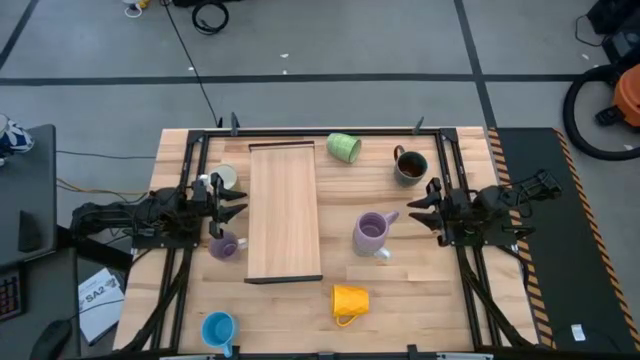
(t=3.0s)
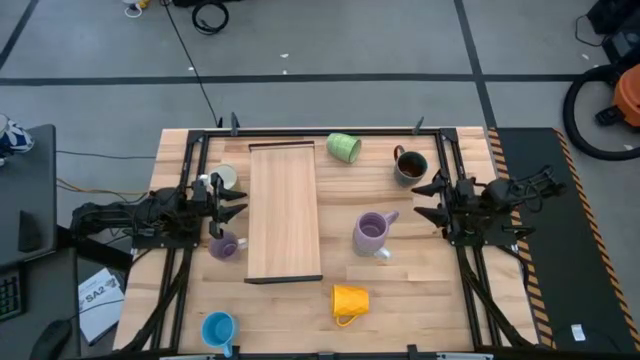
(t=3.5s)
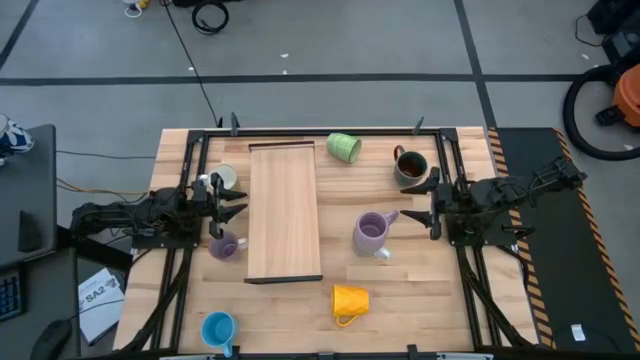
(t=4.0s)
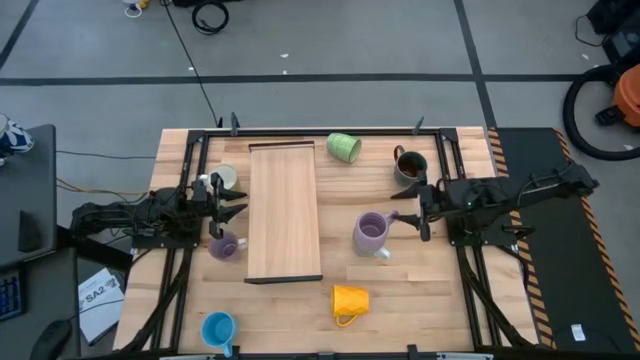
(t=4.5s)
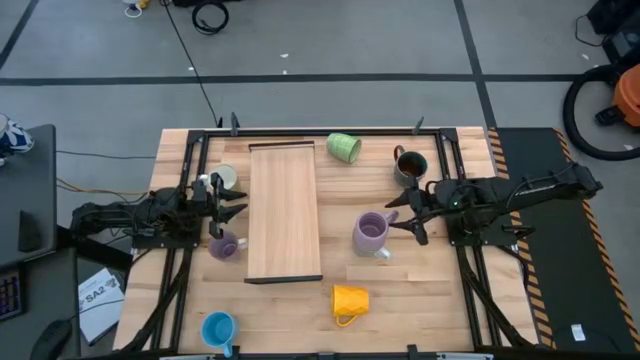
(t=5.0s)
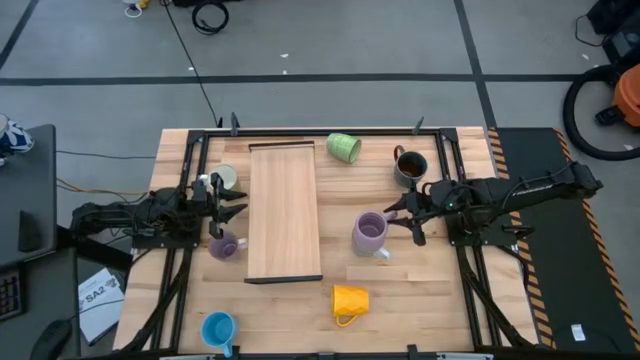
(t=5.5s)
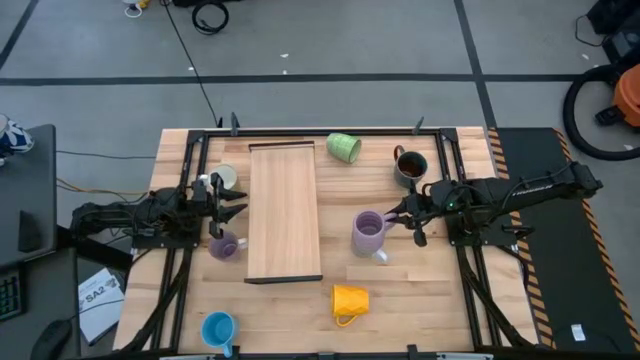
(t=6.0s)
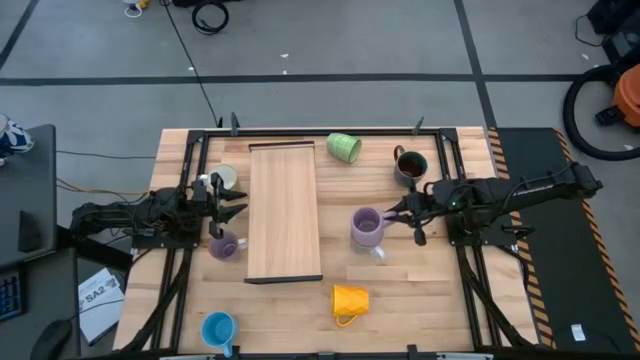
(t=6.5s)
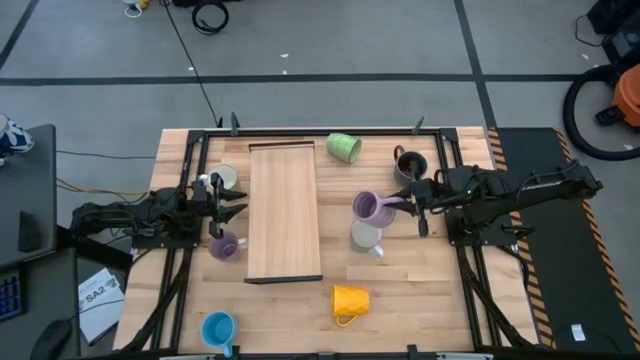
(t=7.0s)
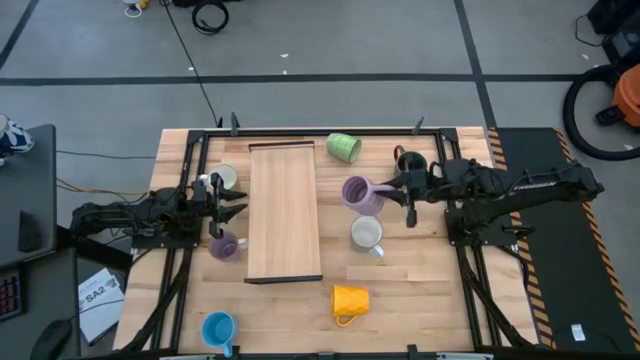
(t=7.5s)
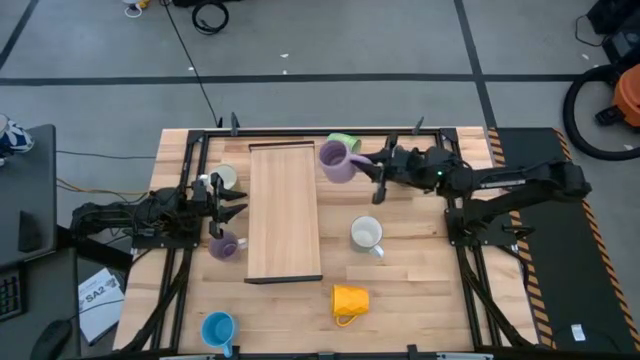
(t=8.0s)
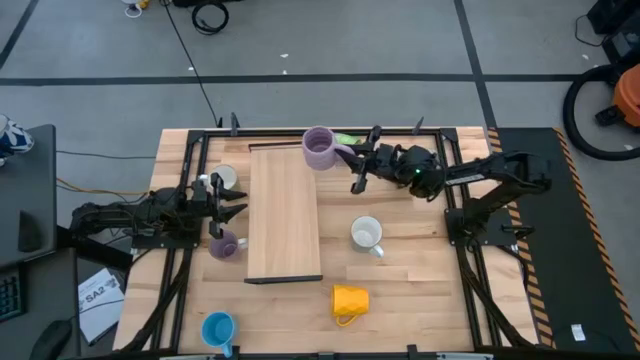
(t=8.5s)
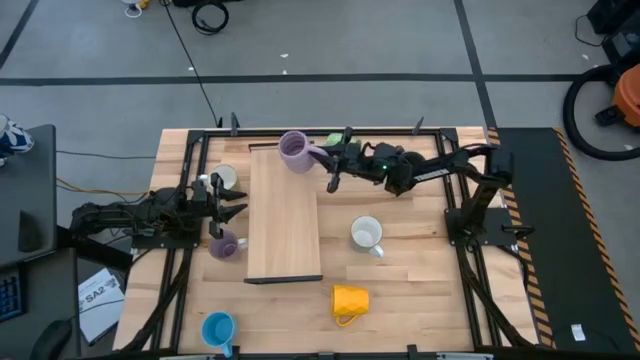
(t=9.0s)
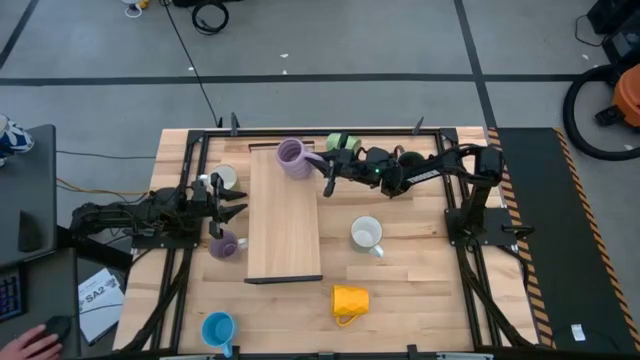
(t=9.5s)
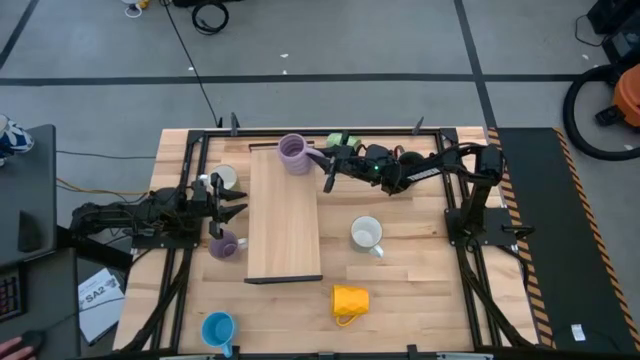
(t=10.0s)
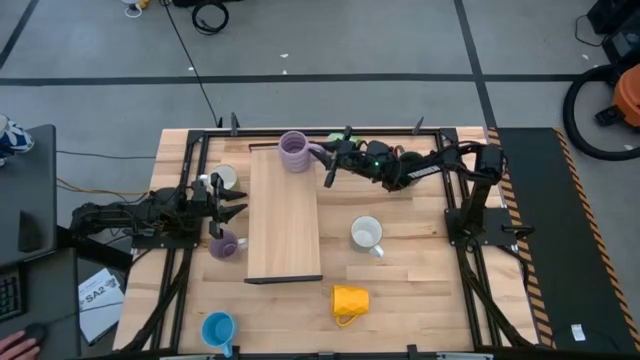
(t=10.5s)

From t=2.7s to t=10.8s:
Task: Place coffee mugs
Put the light purple mug on the shelf

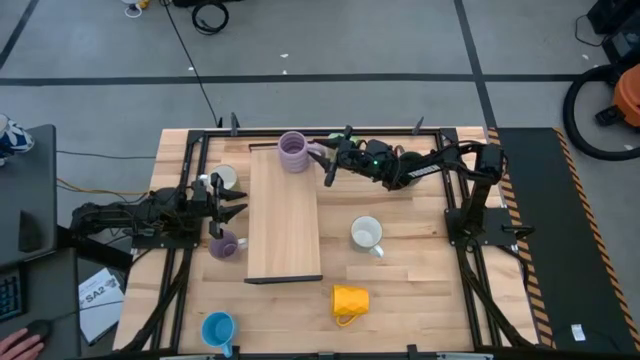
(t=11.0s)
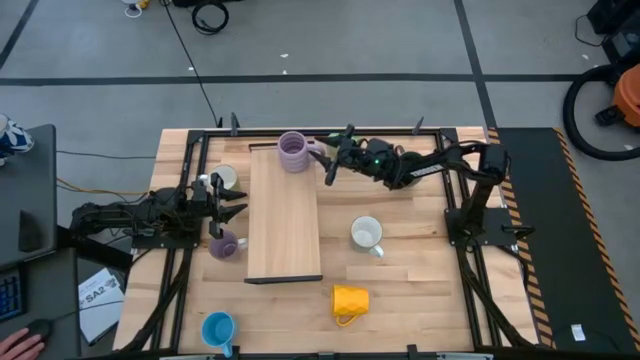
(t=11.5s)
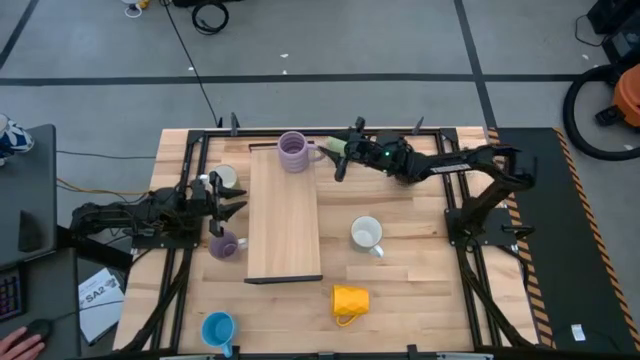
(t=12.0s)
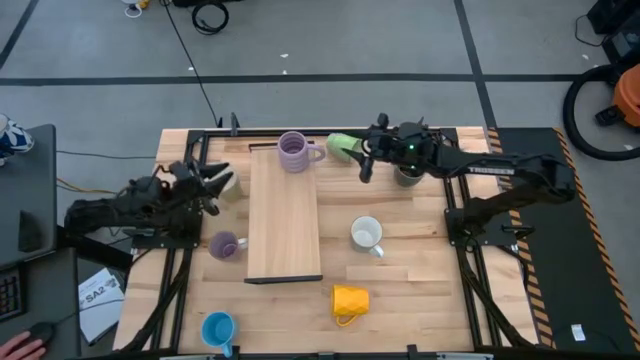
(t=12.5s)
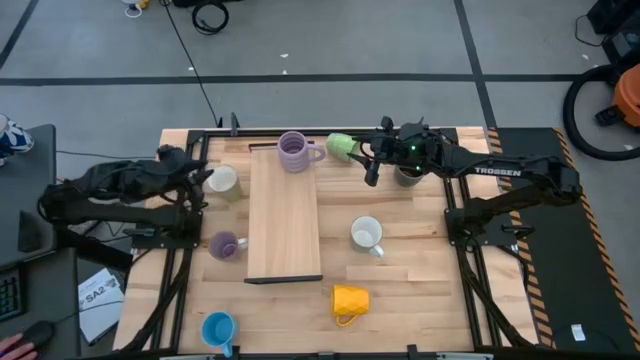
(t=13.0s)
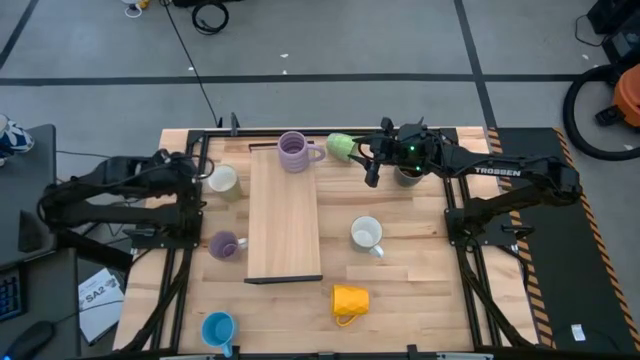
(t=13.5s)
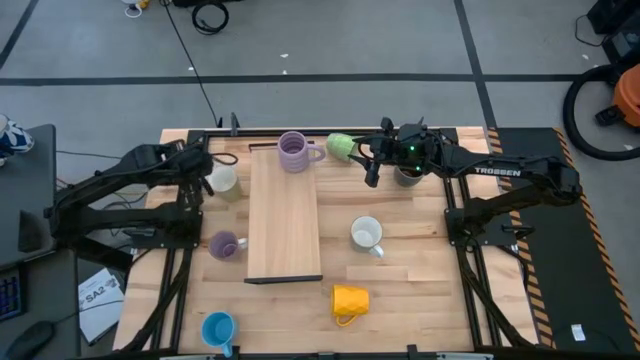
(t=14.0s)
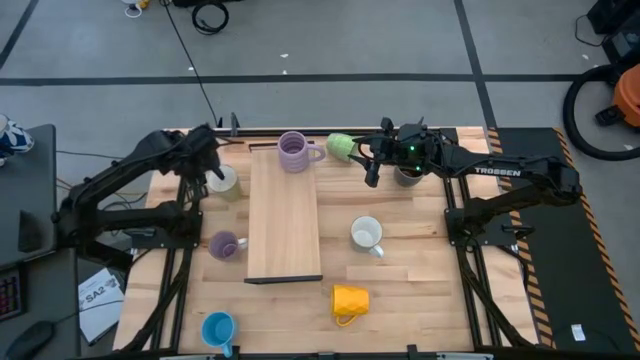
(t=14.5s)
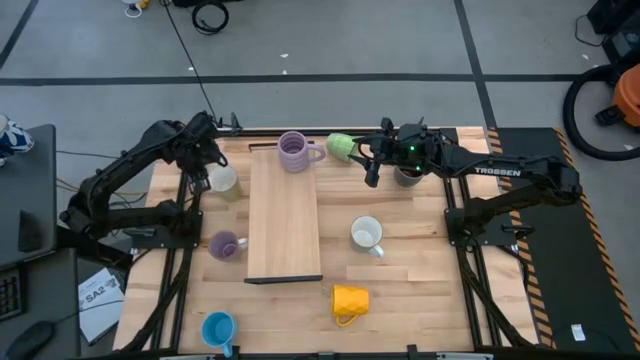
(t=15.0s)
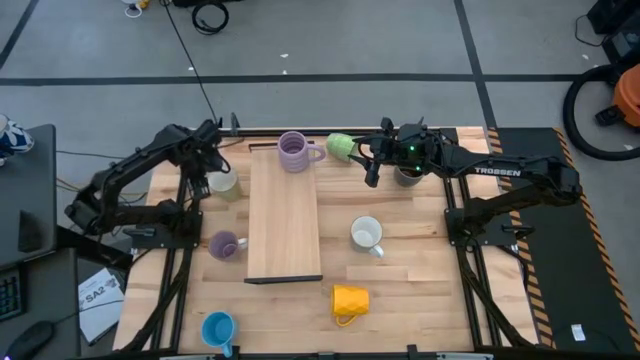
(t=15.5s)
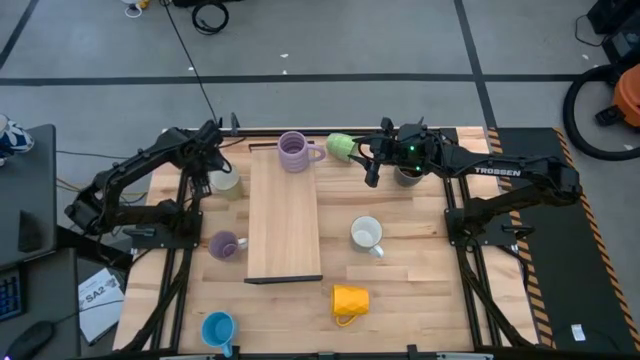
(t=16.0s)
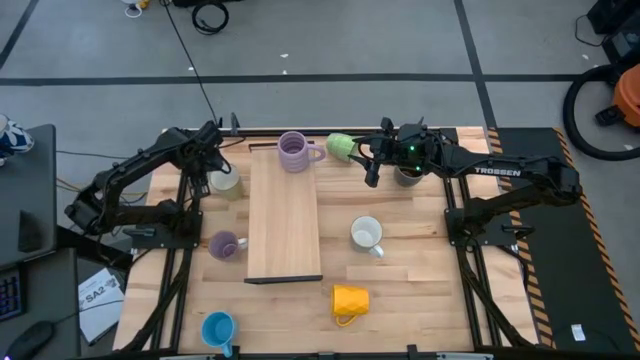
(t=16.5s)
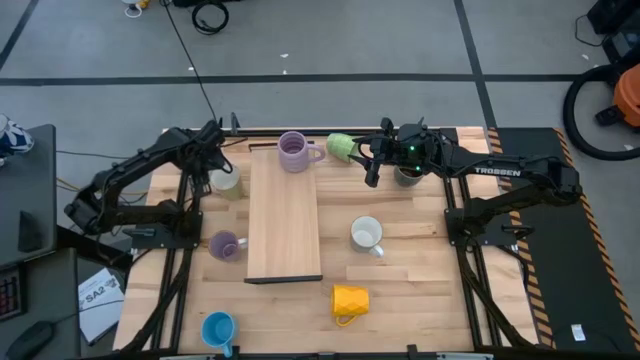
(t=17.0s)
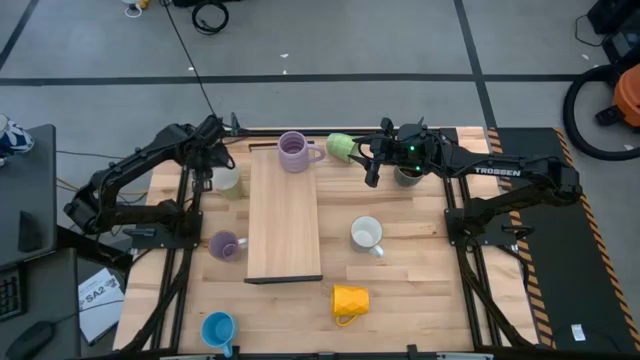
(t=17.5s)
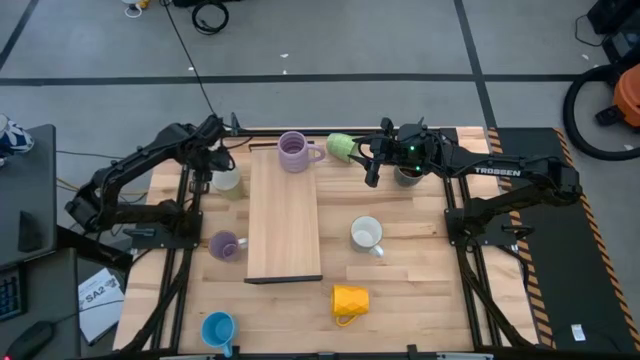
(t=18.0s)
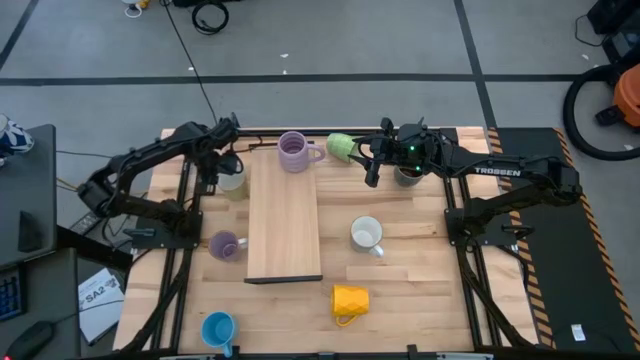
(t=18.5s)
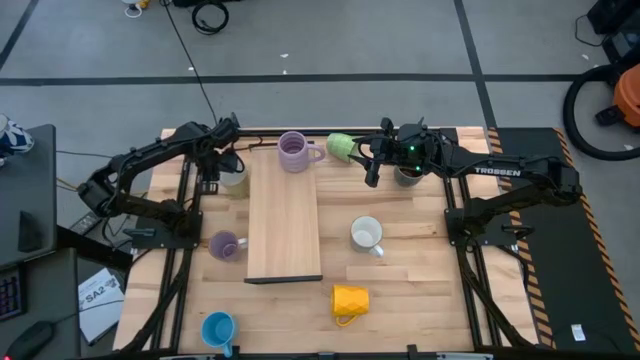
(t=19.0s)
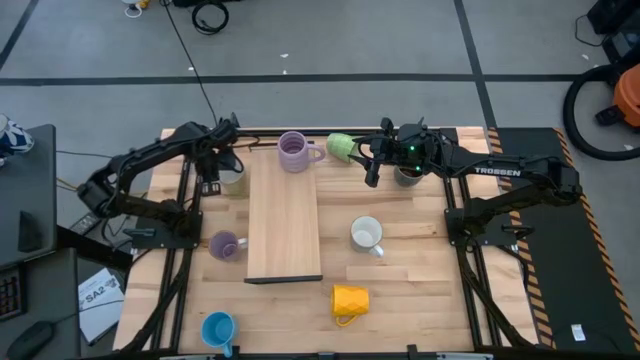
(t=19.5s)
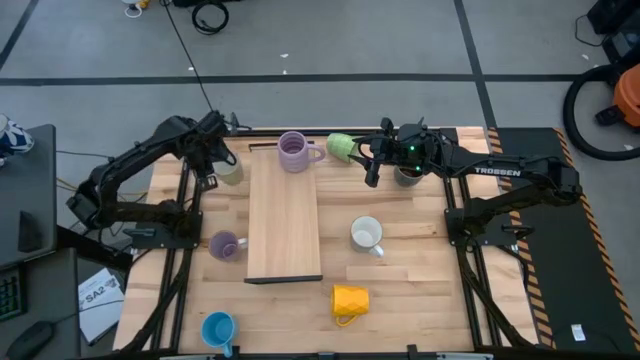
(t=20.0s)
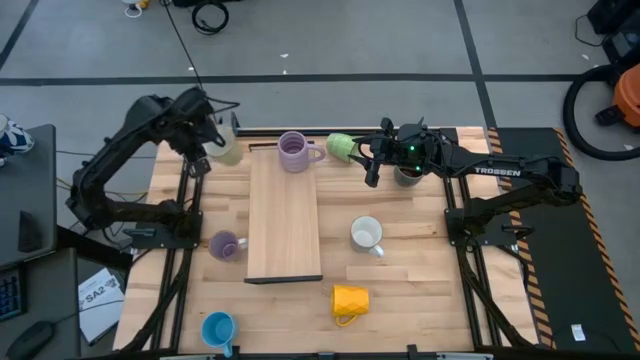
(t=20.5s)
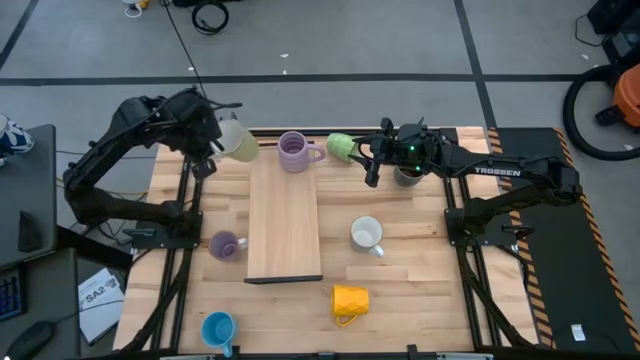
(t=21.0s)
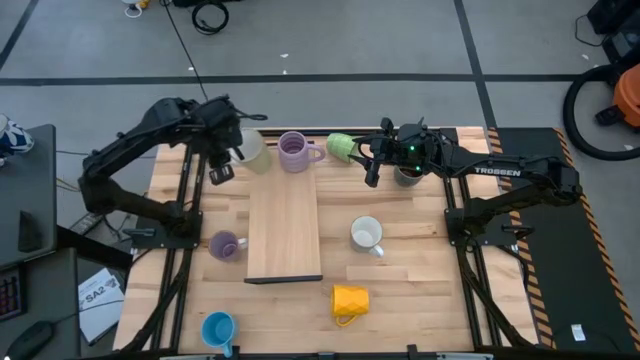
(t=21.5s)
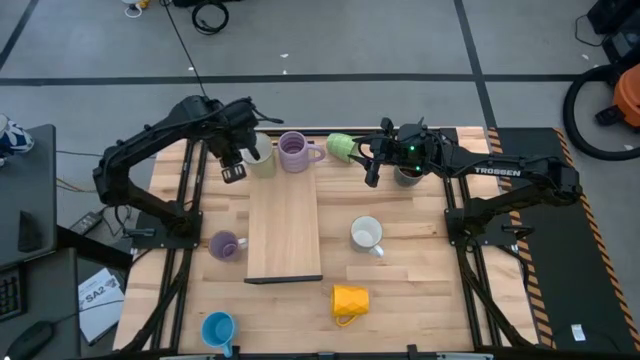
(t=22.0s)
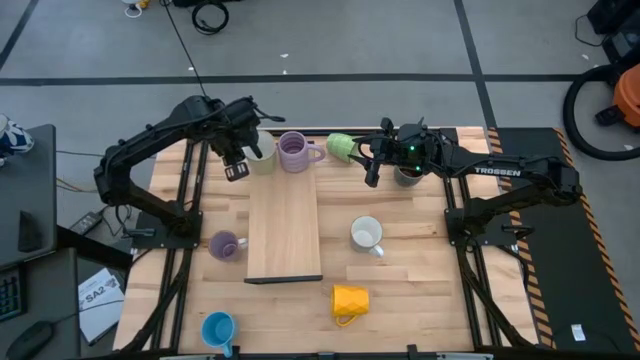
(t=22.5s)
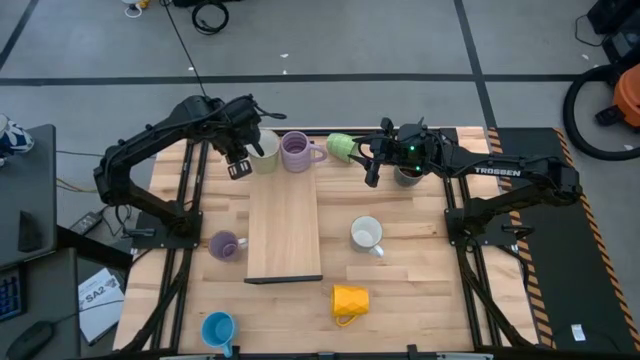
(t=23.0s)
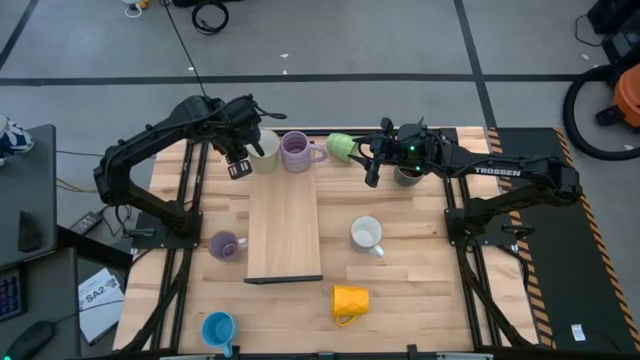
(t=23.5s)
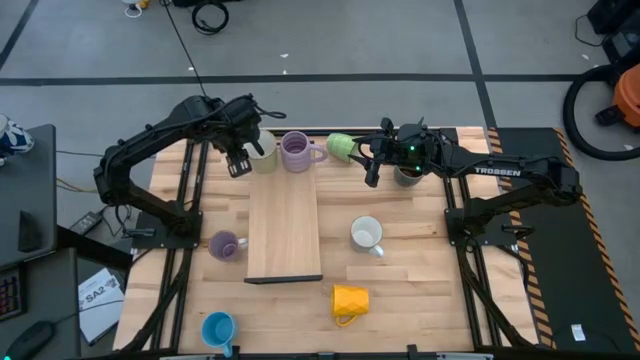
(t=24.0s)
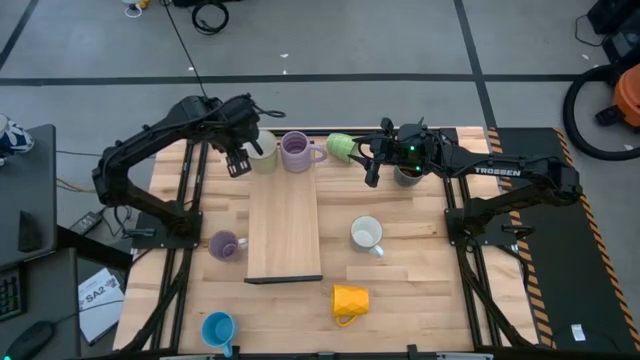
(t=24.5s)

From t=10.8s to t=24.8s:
Put the light green mug on the shelf
